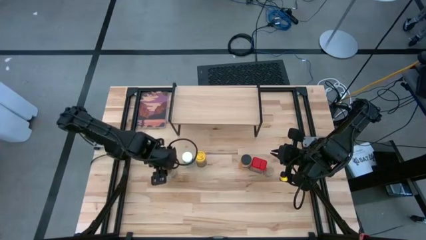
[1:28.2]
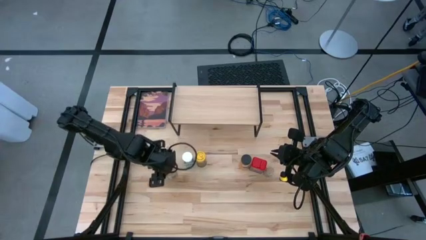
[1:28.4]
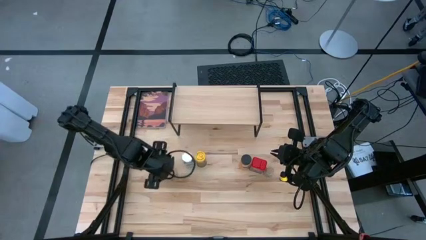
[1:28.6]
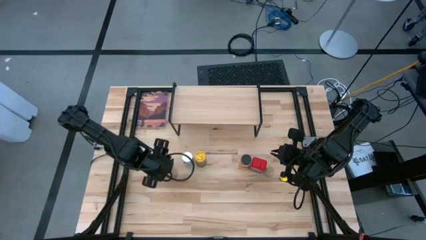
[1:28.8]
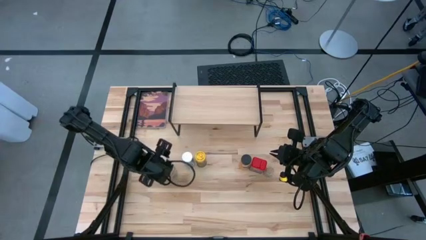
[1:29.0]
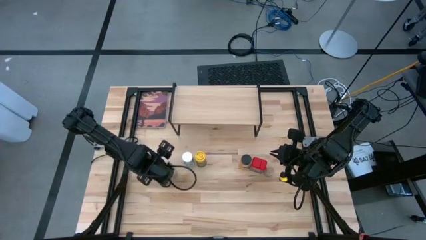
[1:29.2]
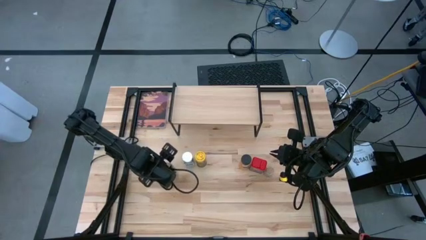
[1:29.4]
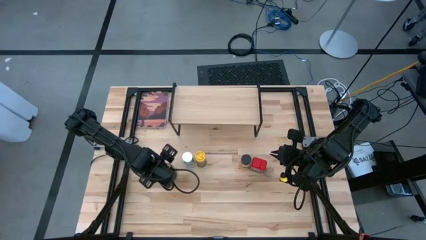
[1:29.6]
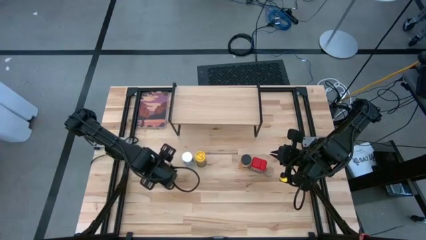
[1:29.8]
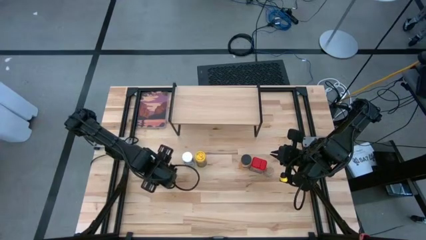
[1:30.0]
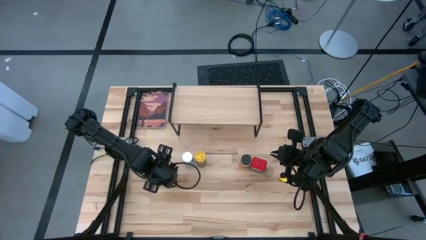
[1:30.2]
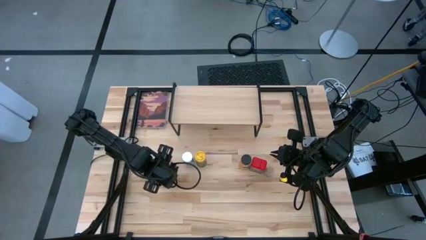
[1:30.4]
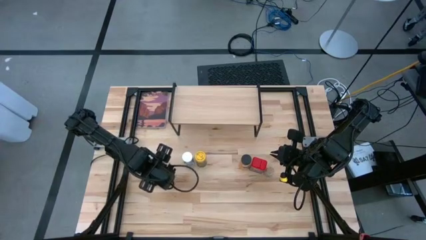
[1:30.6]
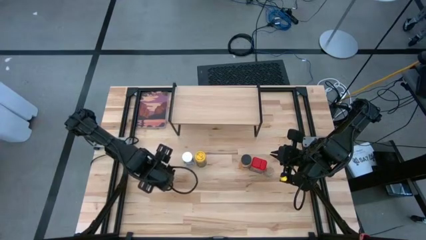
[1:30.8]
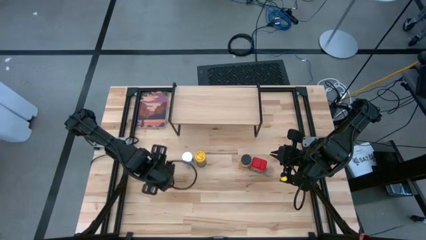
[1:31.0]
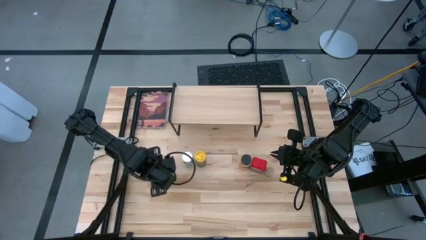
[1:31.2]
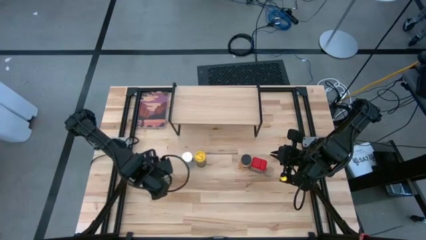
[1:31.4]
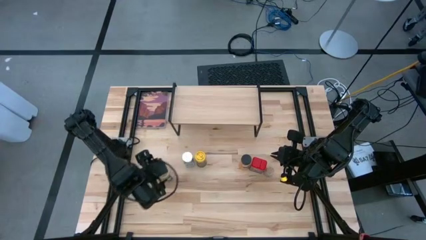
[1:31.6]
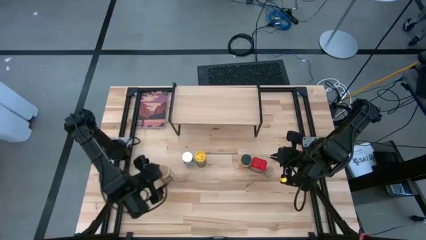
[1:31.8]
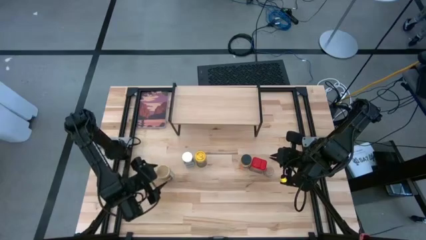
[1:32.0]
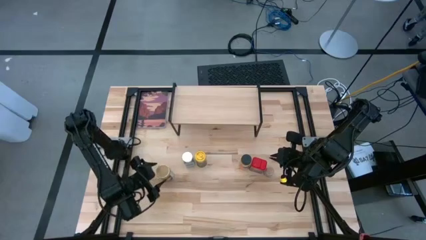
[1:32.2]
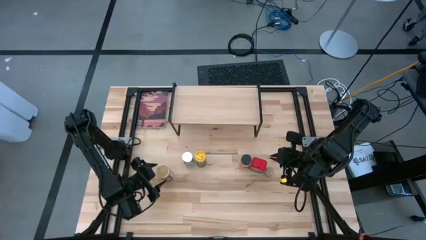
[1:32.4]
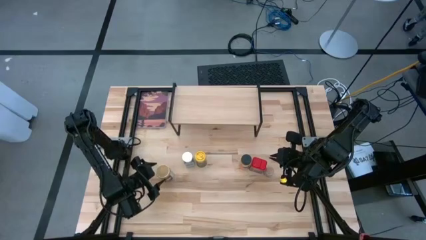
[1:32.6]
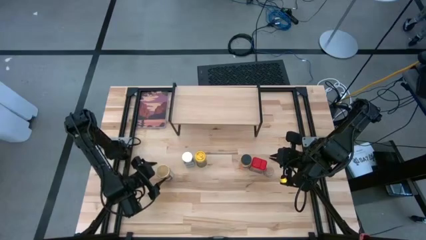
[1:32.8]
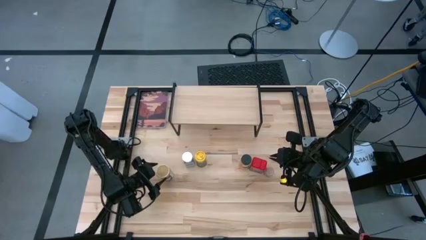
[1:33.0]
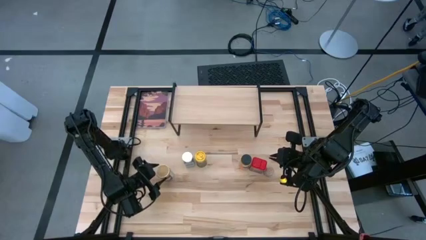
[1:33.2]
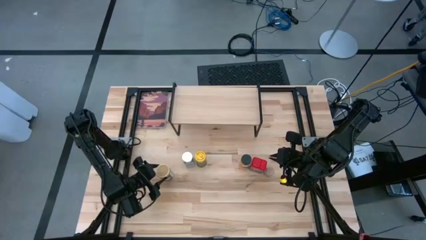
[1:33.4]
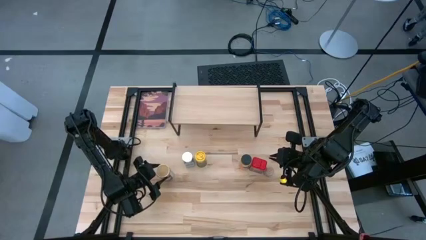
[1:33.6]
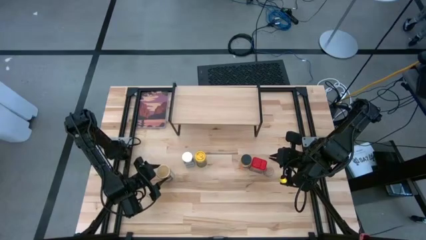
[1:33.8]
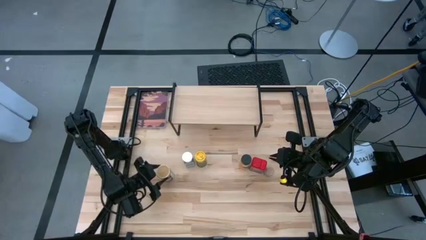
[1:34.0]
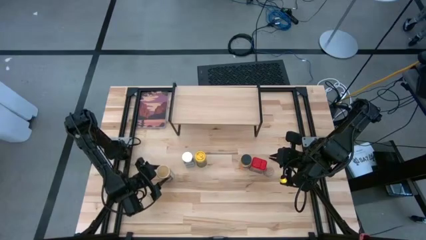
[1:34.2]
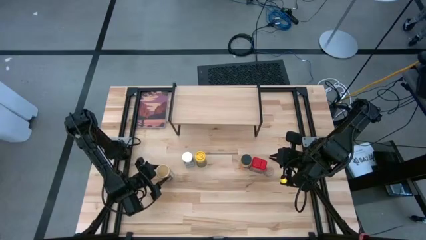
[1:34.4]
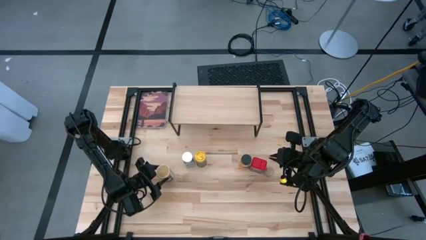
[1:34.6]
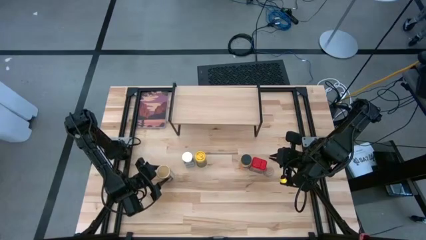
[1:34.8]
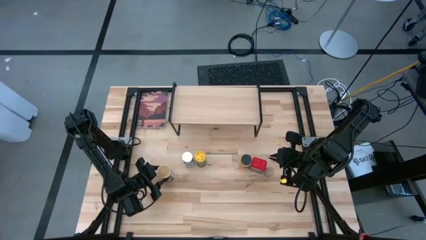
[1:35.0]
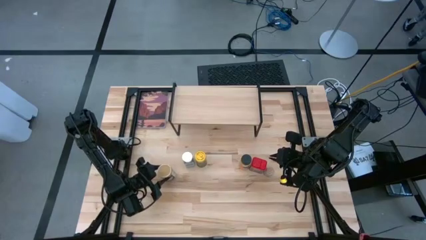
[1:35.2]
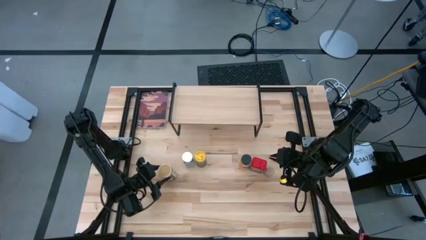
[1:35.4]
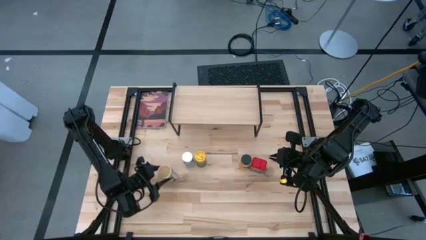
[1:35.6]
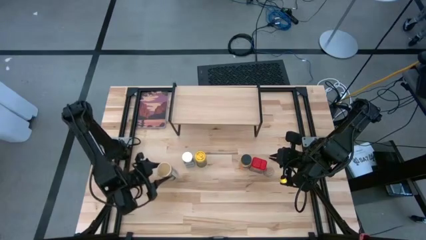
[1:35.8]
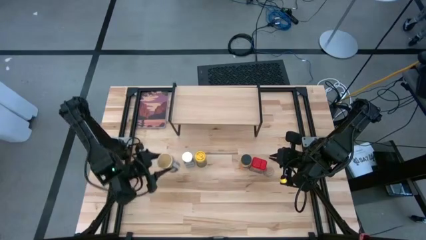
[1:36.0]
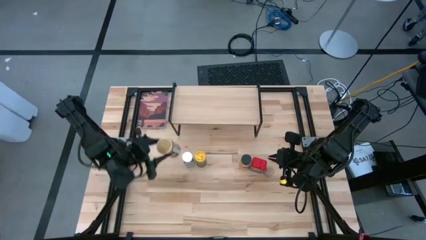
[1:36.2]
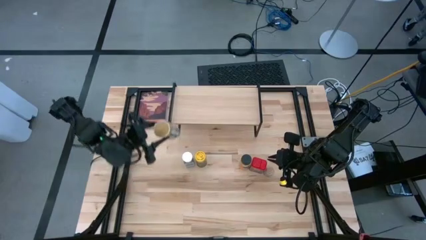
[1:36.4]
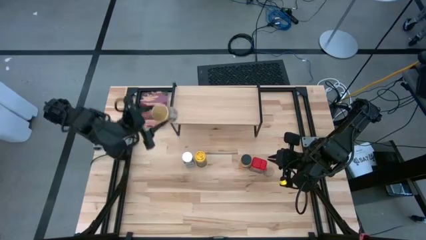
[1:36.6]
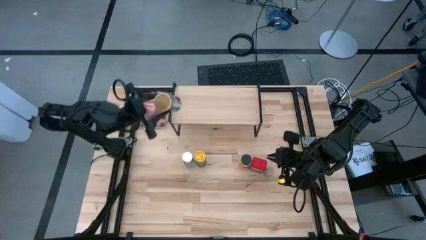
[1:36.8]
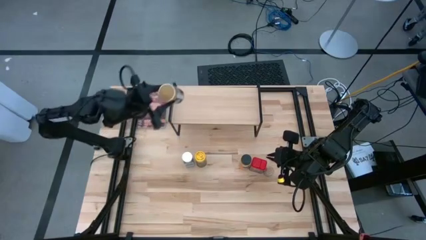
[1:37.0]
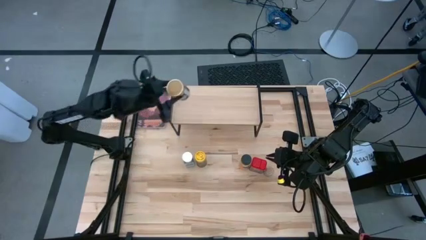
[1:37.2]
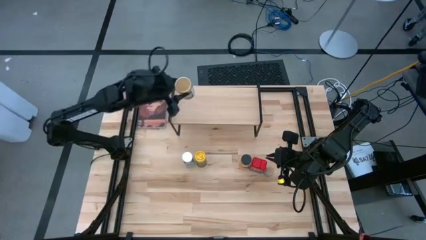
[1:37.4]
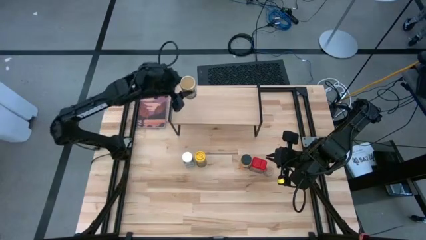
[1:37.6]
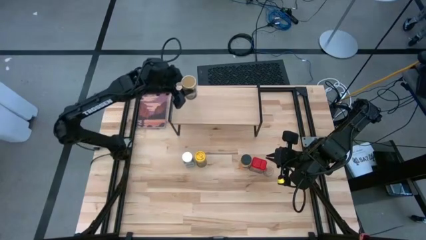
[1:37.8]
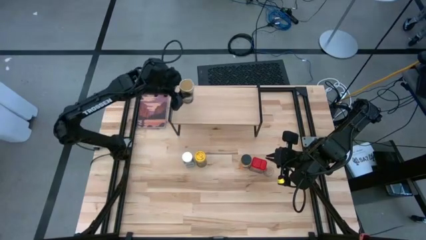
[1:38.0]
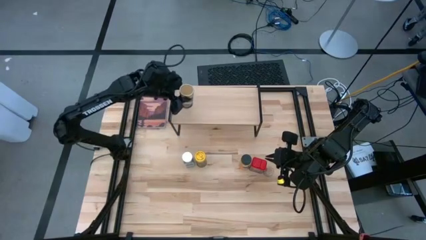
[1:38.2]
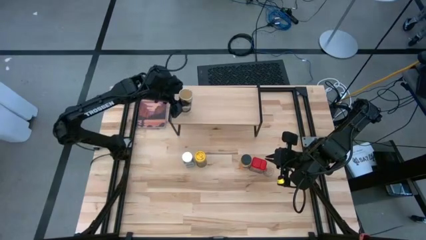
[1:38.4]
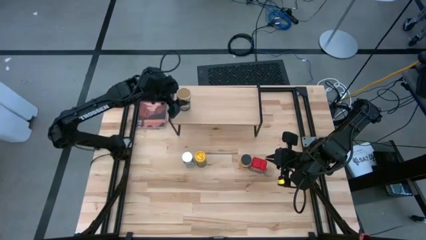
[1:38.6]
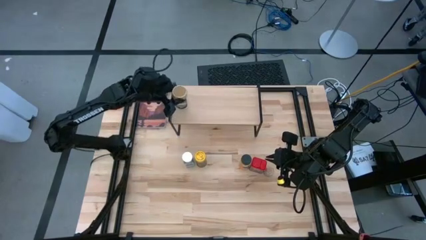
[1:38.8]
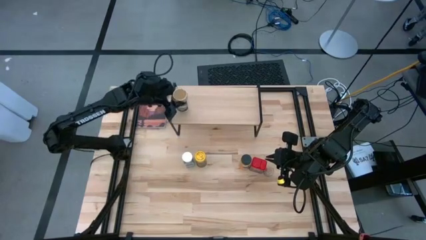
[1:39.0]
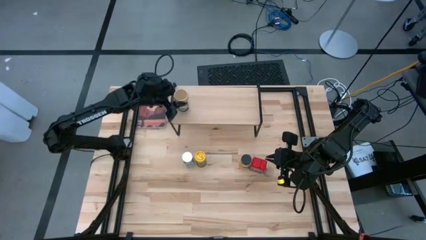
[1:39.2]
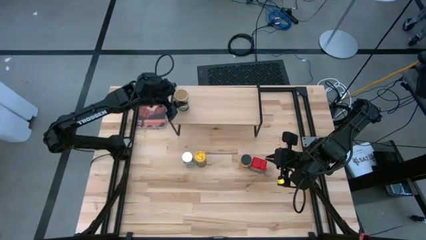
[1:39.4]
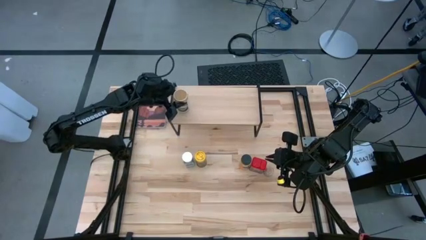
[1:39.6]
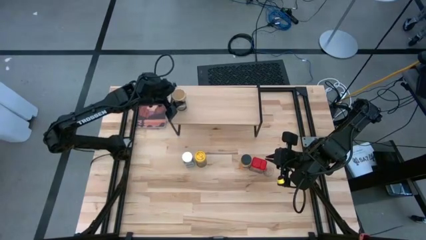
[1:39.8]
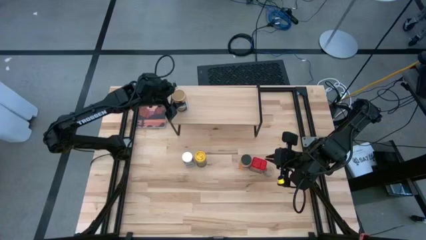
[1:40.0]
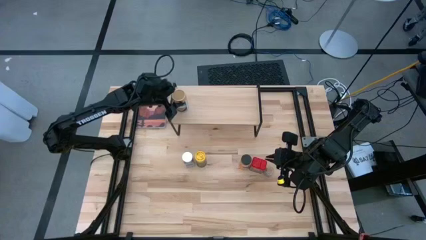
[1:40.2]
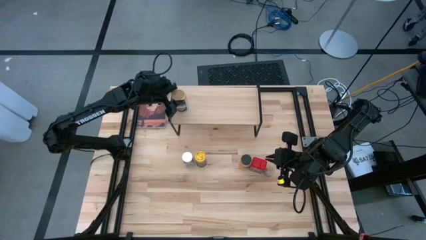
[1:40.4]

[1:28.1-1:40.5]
Task: Shelf spices
Put the golden seasoning bottle on the shelf

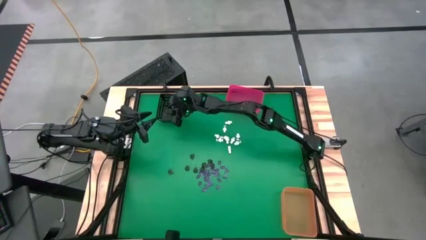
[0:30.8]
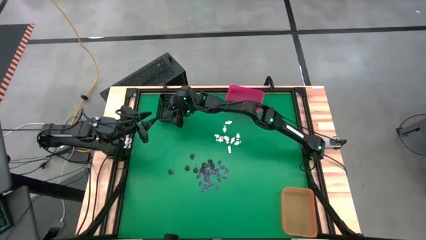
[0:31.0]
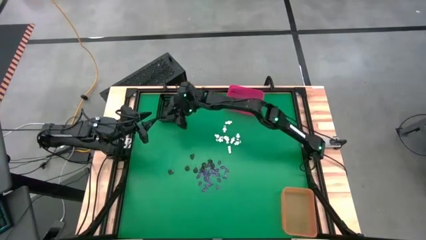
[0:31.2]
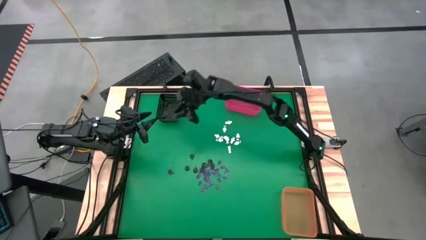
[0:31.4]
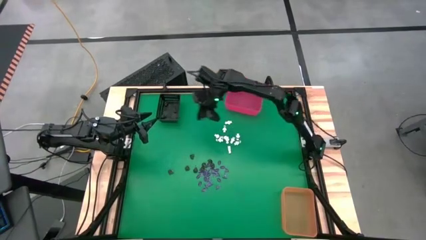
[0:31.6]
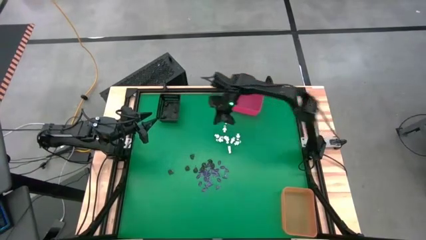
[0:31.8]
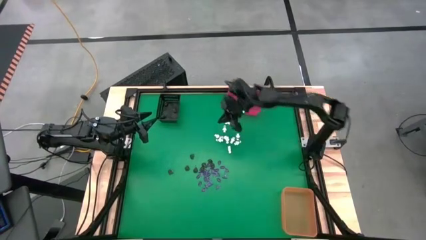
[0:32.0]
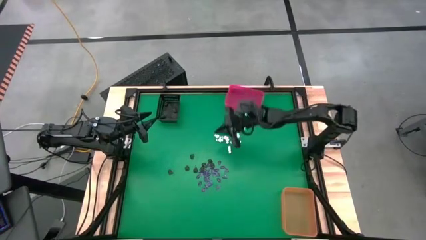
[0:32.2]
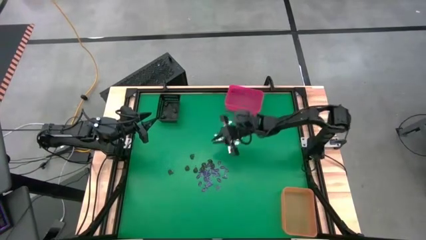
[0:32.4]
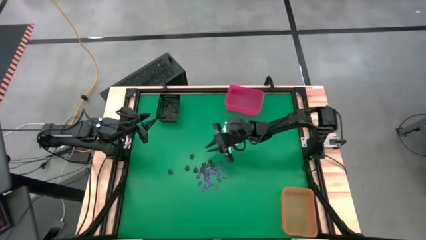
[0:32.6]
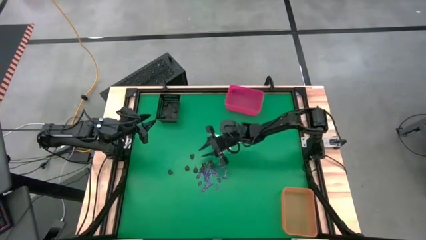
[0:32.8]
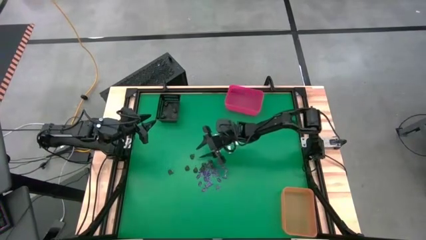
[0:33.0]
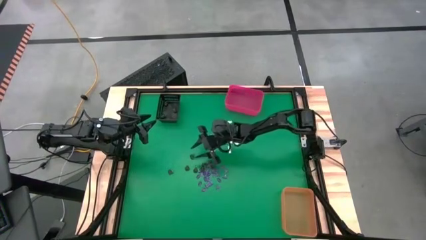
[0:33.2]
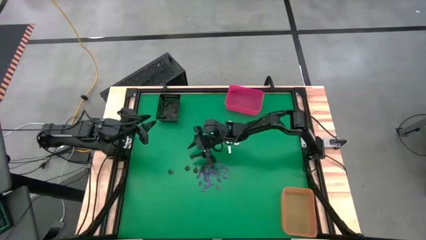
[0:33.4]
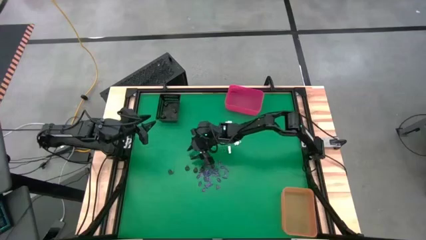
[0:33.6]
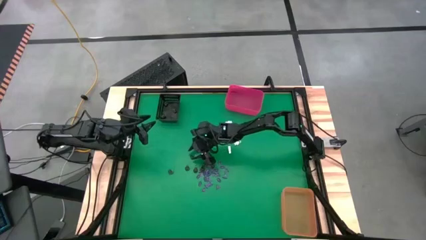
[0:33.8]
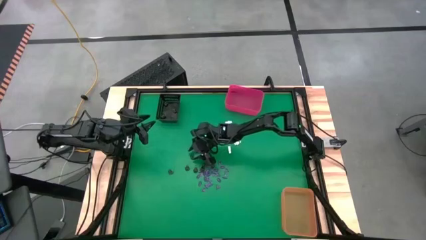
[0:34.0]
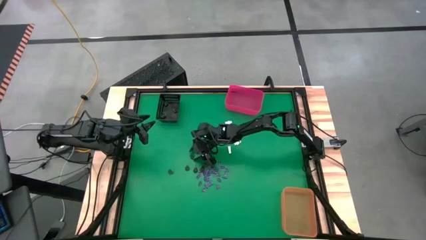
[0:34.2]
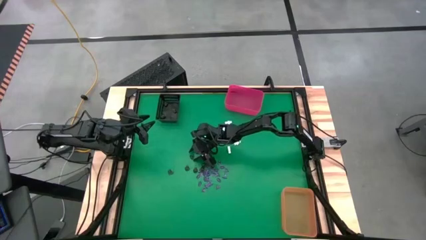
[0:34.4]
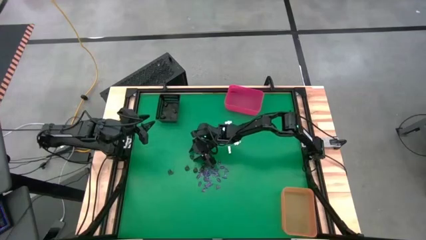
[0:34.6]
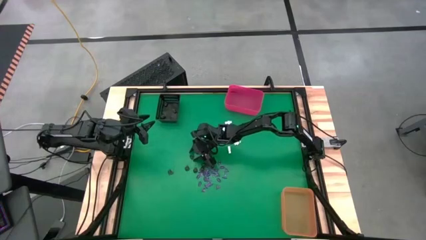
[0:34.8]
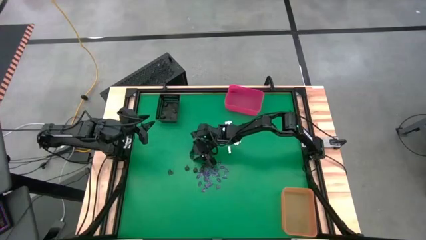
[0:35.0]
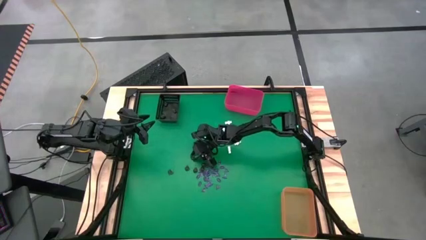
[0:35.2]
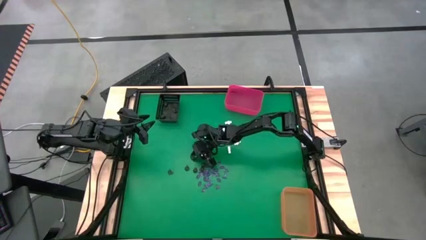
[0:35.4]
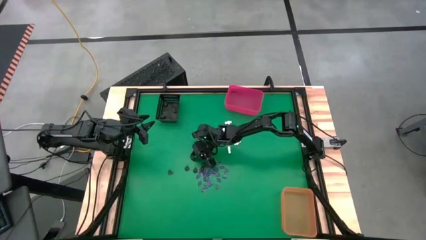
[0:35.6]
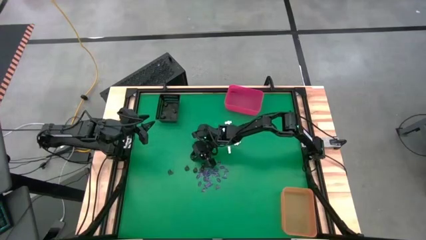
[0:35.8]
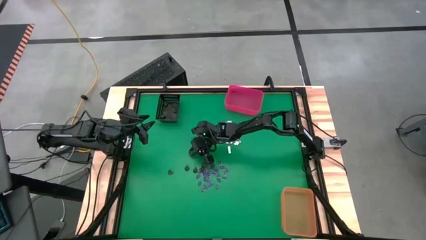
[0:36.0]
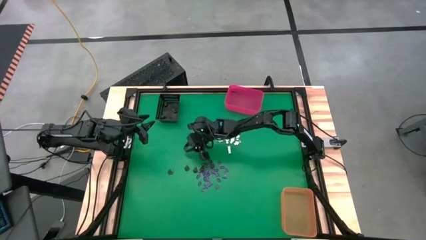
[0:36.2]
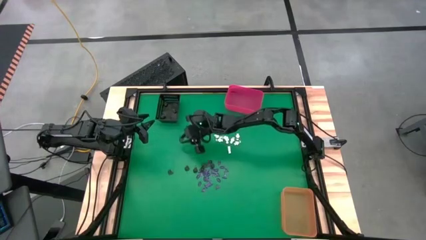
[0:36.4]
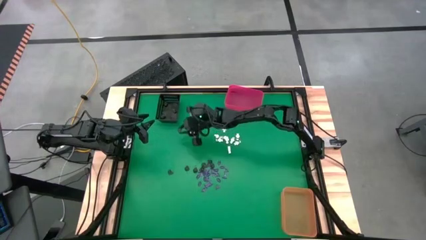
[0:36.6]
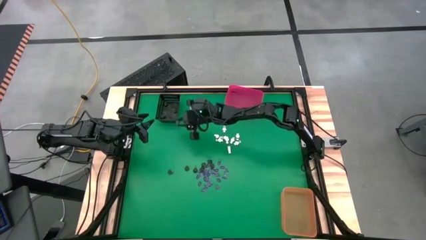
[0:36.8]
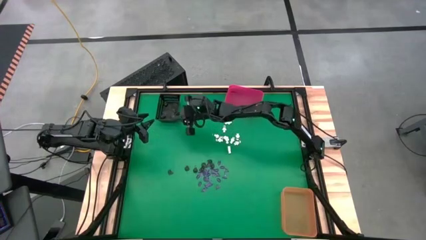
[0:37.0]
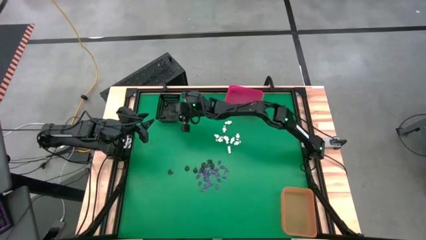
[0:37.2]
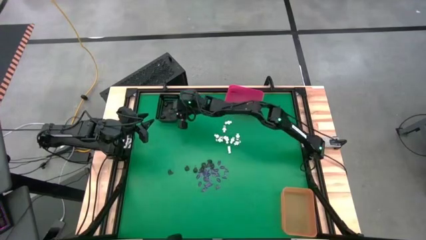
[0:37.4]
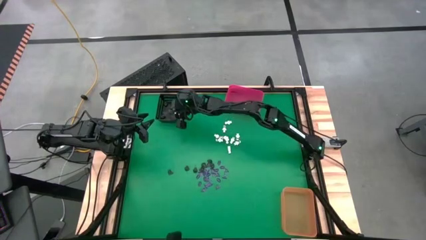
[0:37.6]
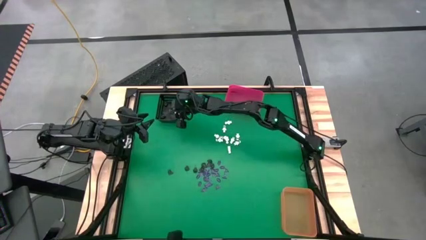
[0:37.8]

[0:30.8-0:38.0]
Task: Sort Halloween decoration
Put the brown skull toy into the black bin
